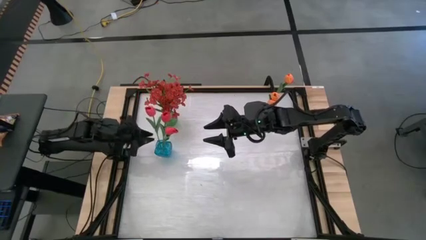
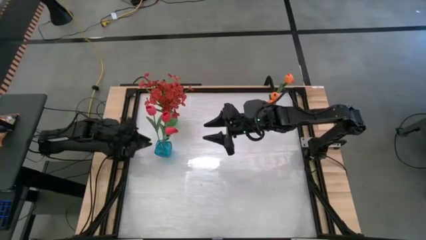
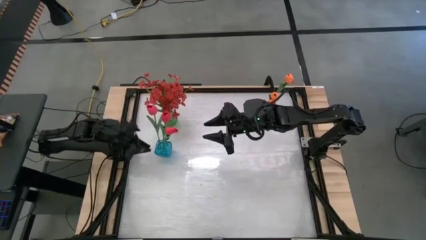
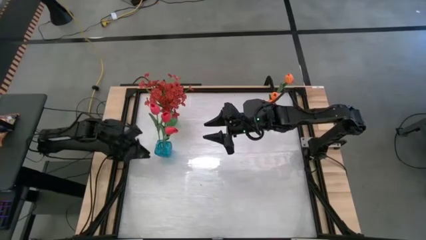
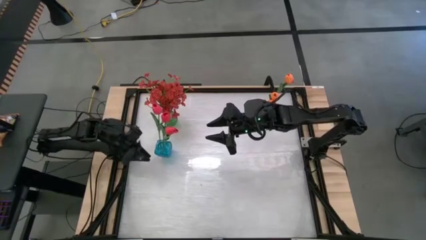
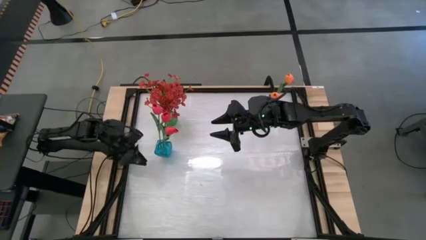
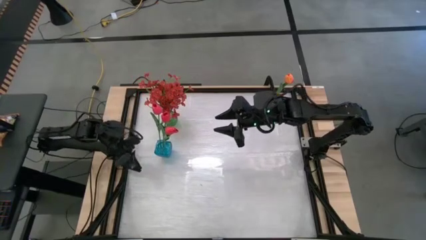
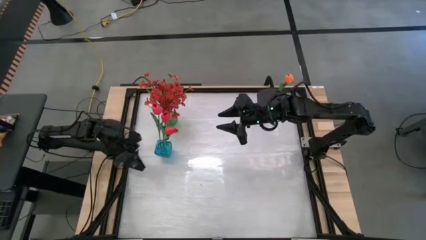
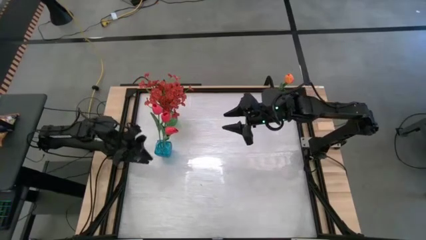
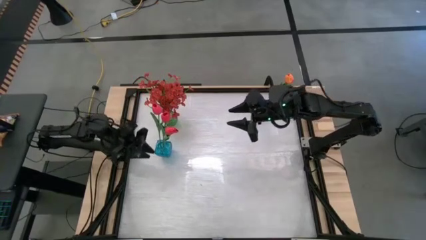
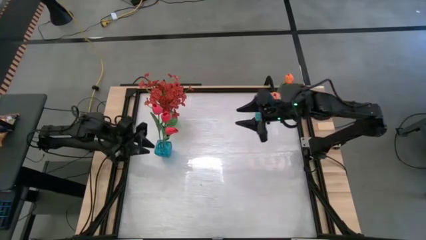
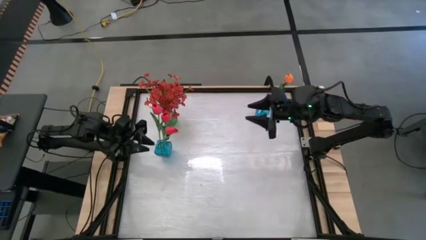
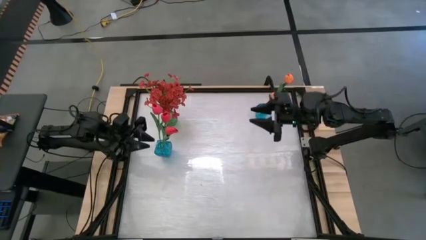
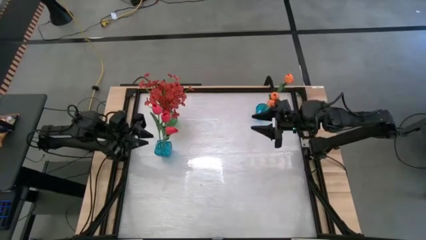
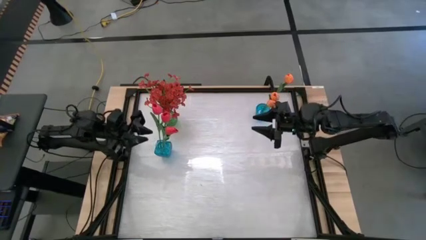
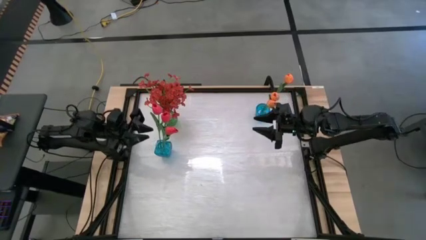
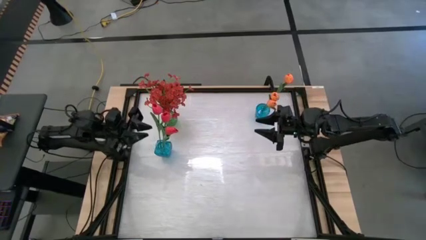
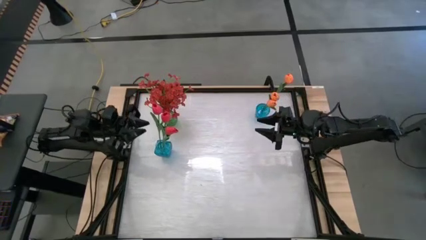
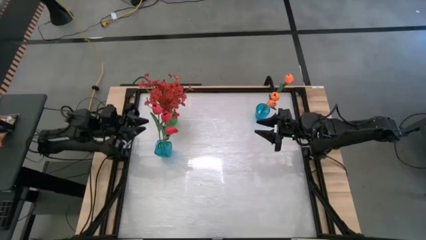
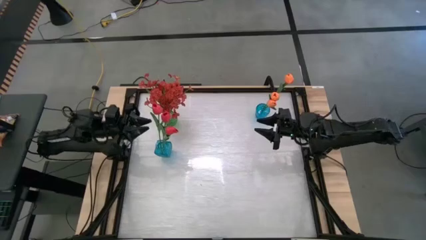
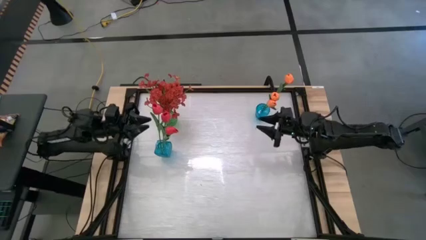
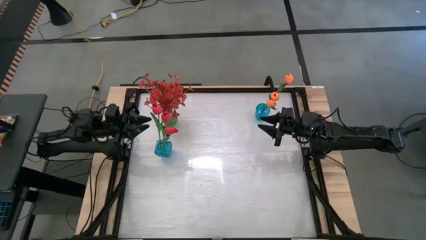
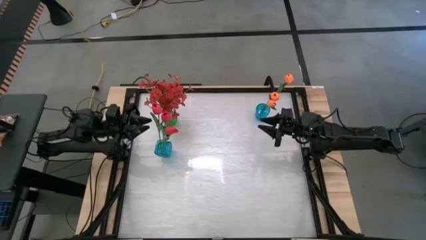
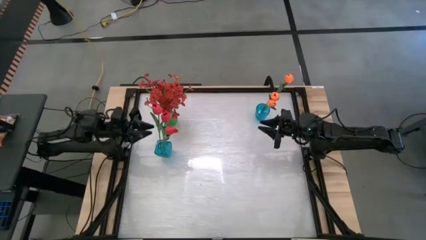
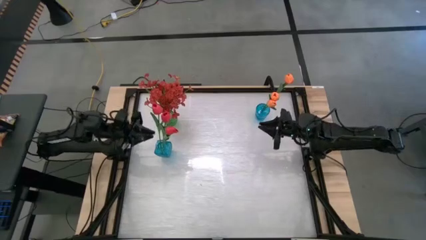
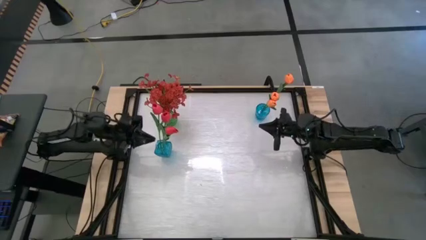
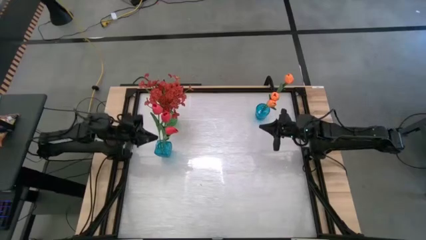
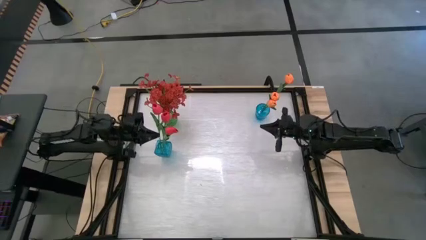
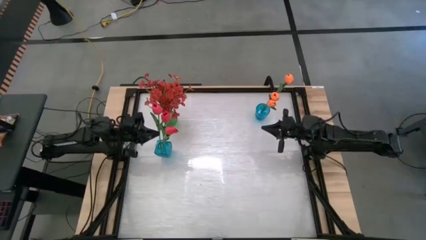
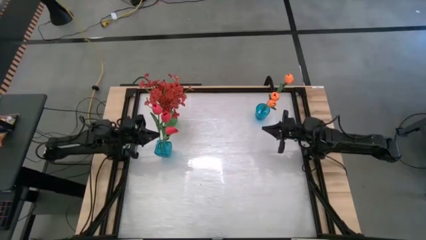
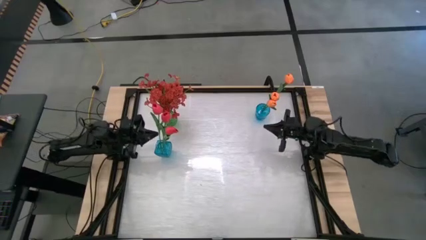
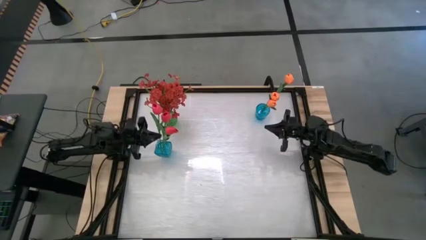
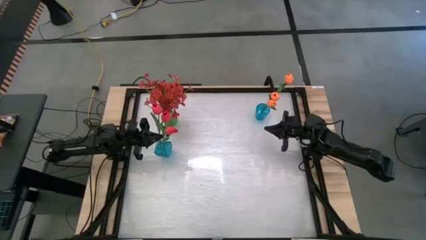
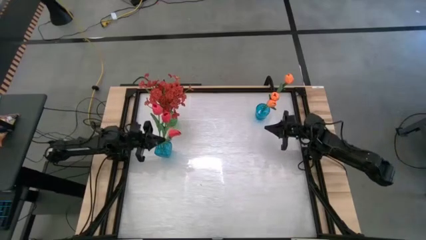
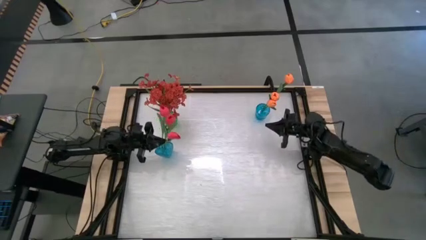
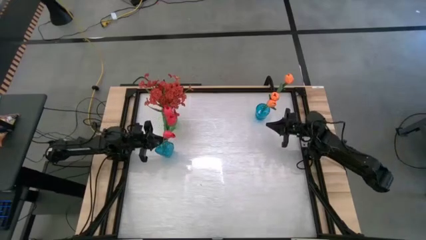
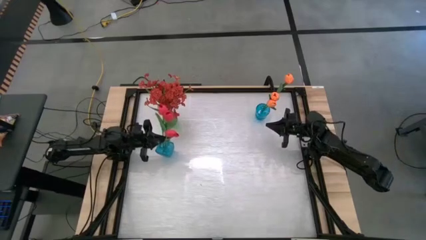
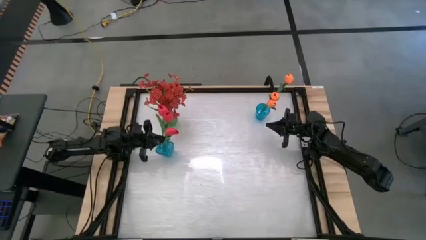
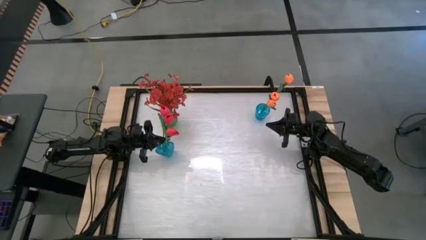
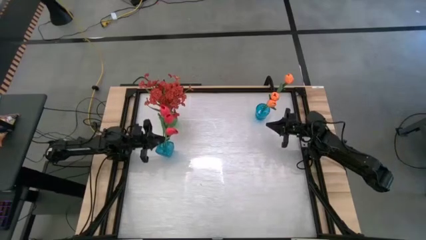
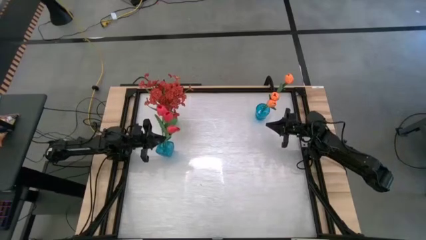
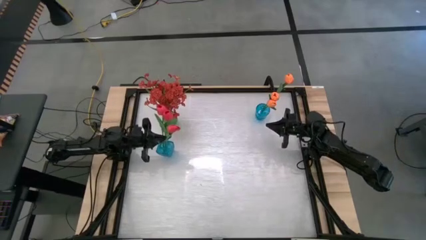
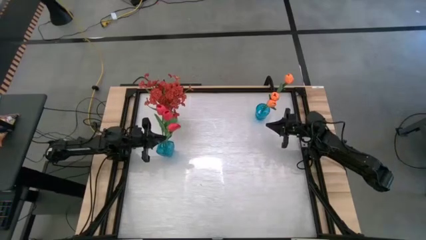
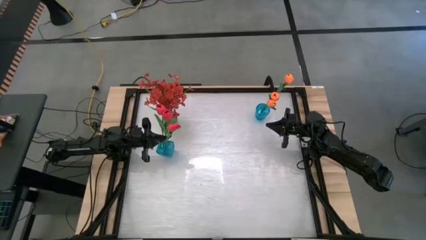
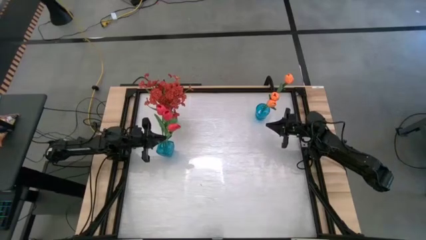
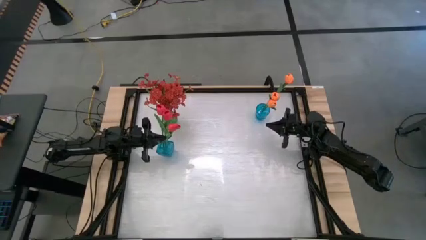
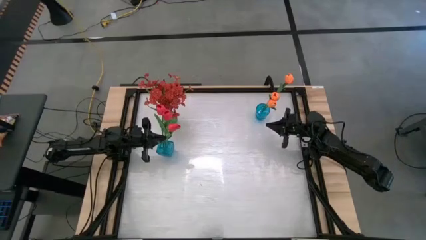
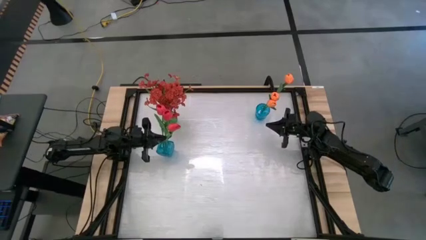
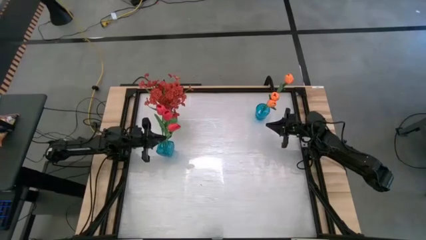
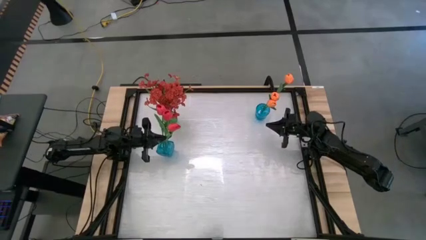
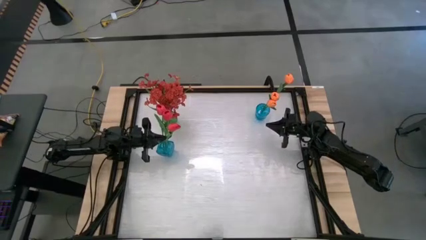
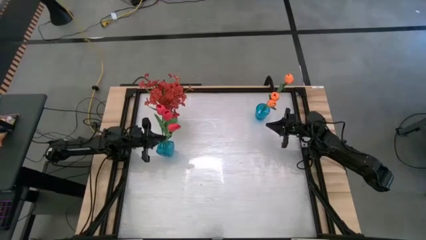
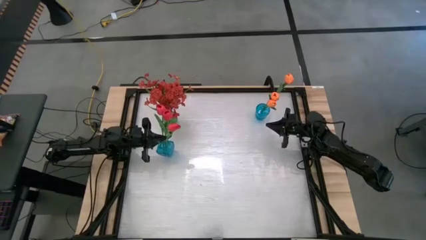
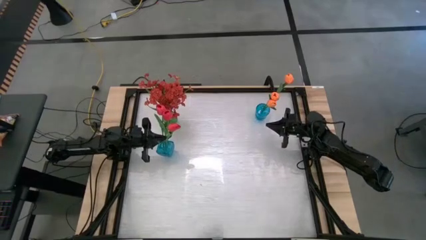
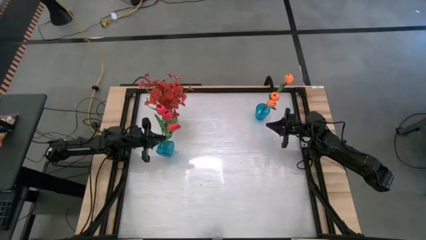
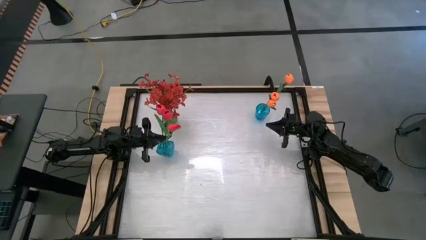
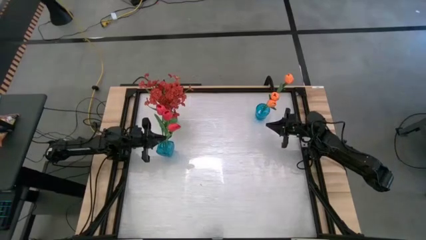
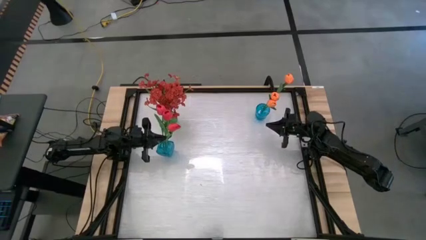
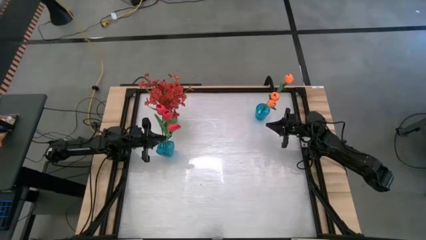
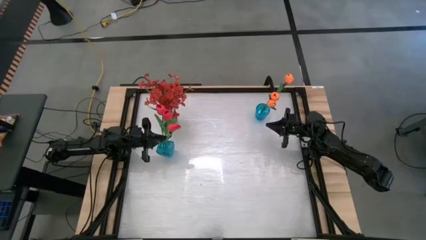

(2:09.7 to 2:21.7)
Task: Sort flowers into vase by color
Return to Home Position

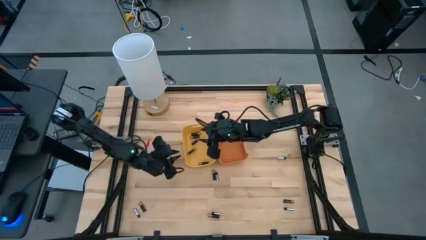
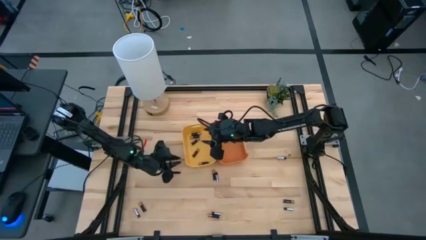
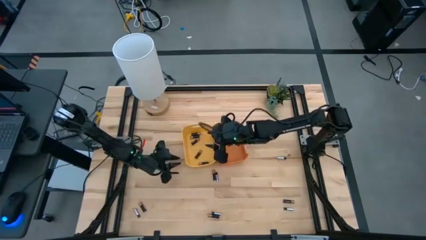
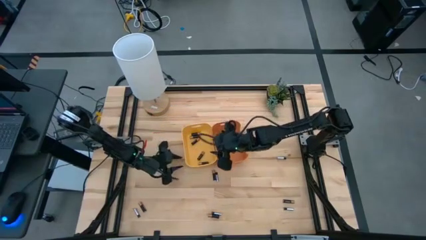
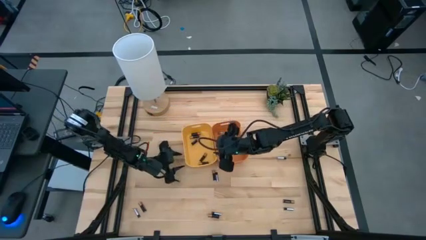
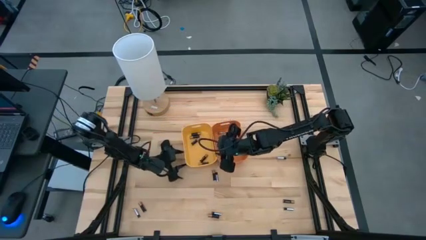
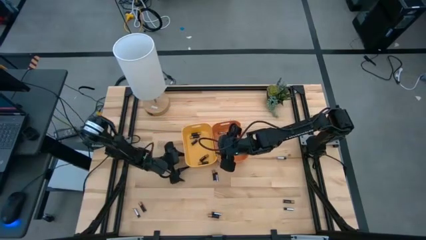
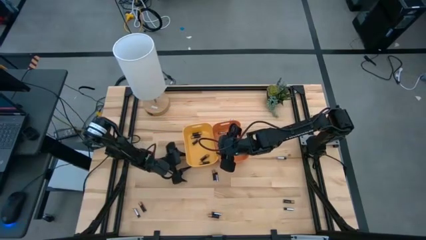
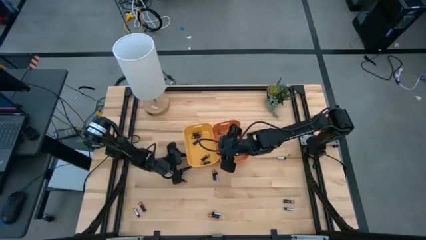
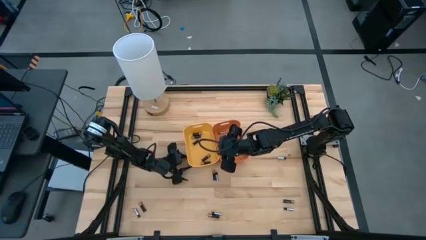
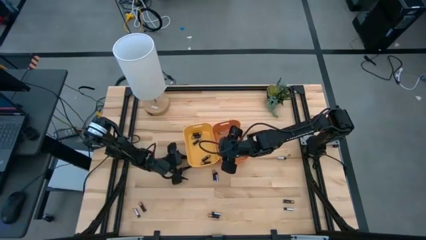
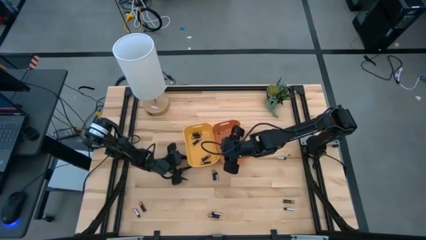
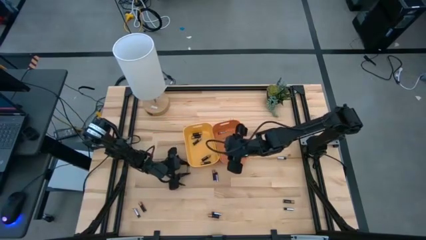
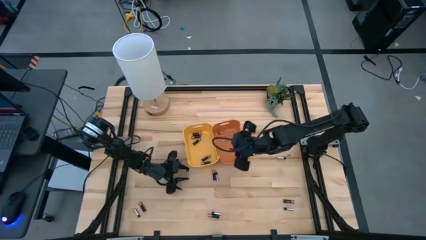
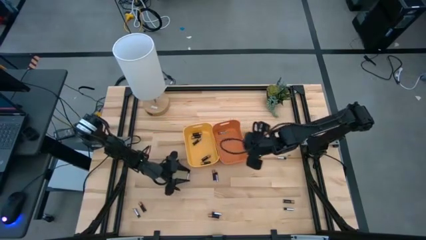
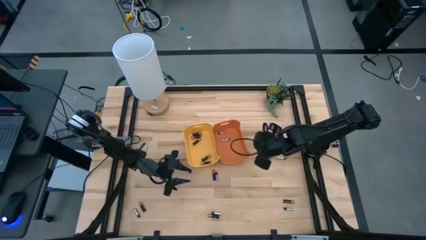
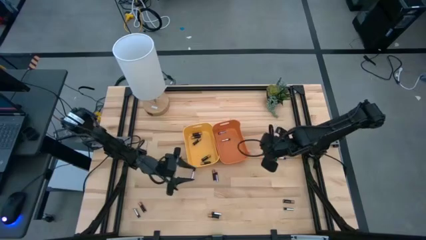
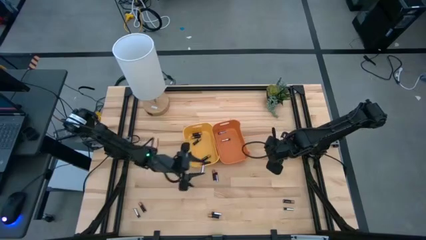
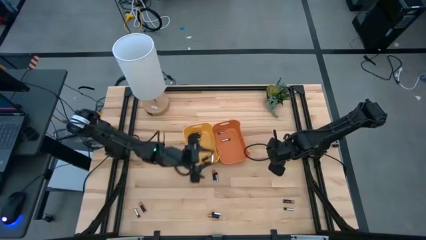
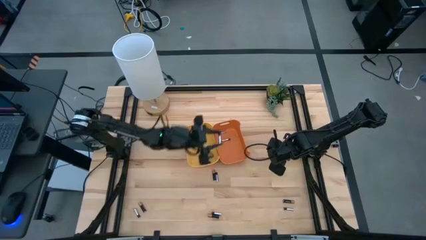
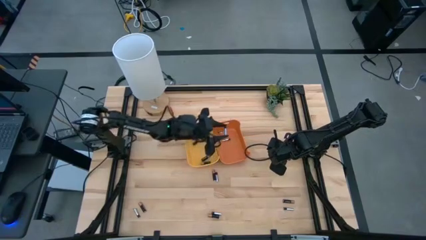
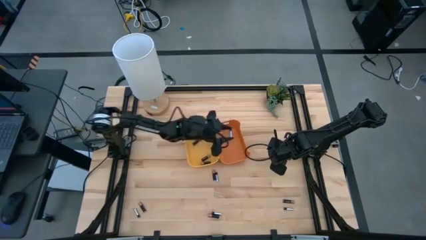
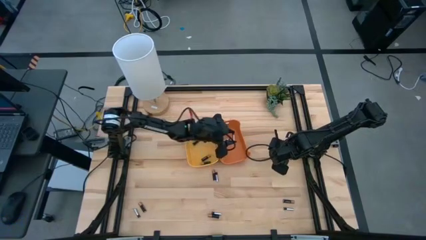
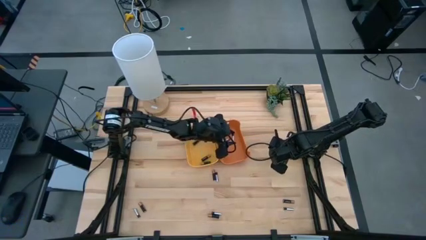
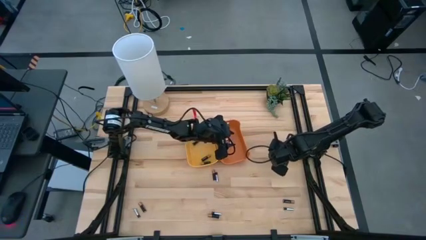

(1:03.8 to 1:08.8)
Task: Sort batteries
Put the middle left silver battery into the orange bin

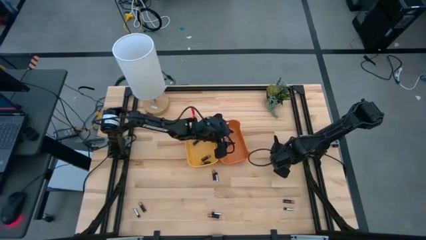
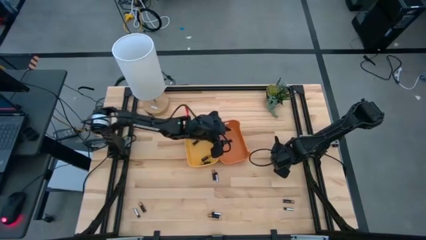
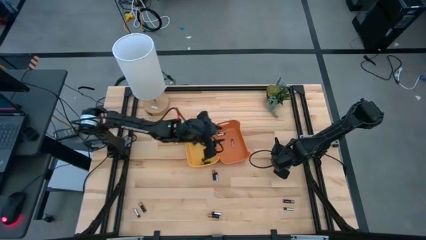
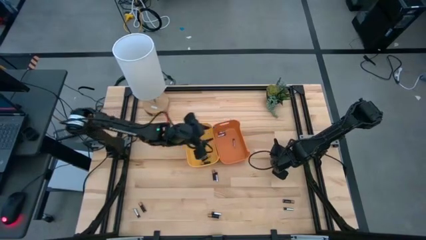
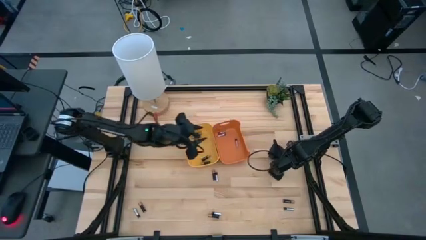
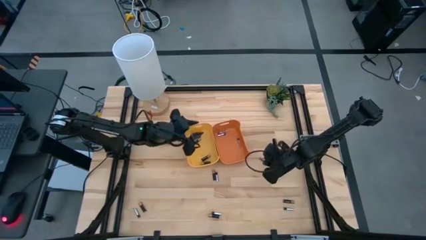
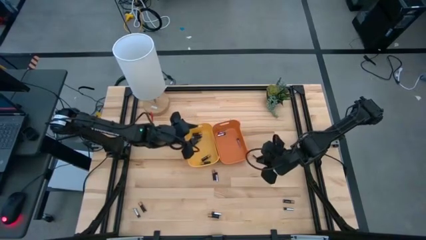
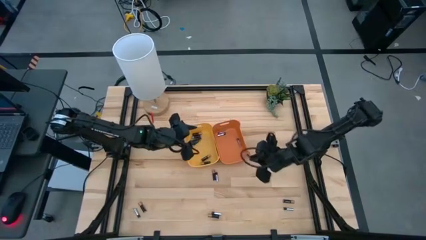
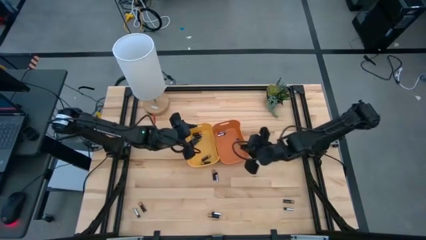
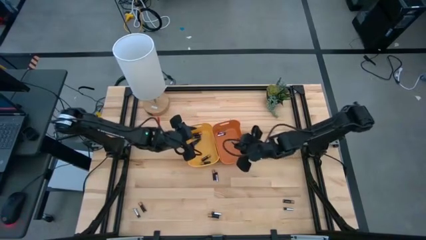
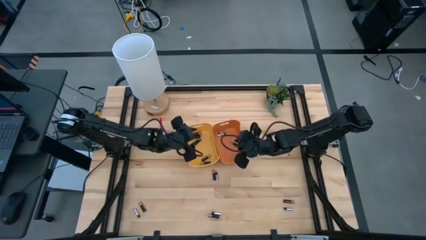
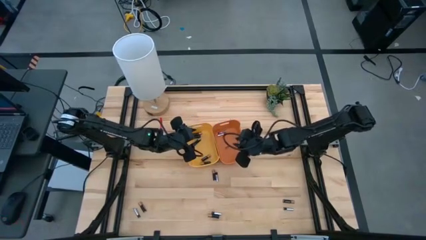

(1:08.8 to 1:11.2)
Put the top right silver battery into the orange bin
